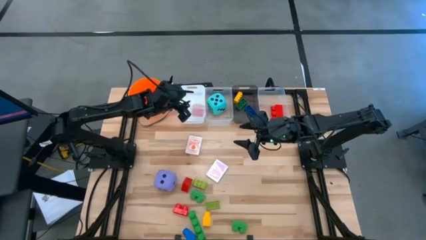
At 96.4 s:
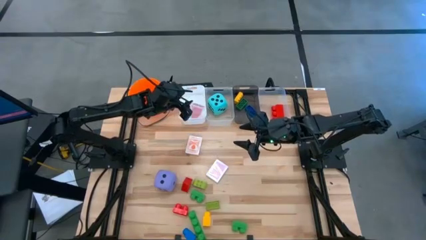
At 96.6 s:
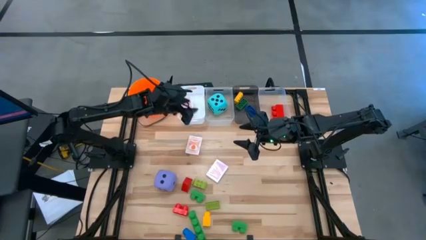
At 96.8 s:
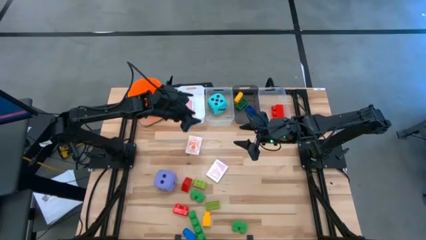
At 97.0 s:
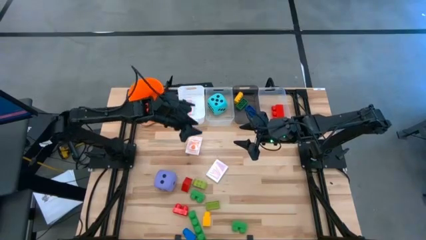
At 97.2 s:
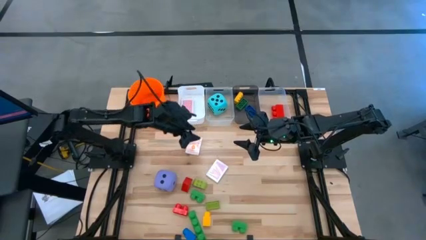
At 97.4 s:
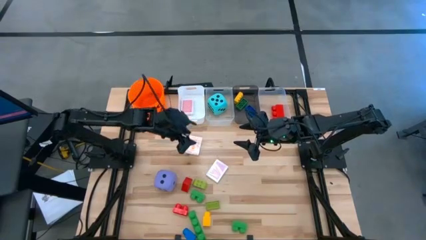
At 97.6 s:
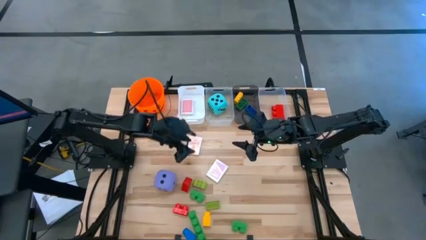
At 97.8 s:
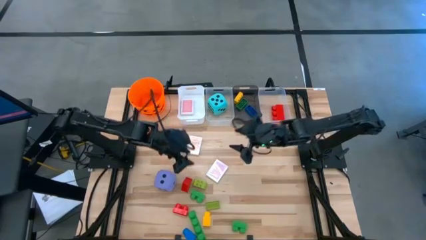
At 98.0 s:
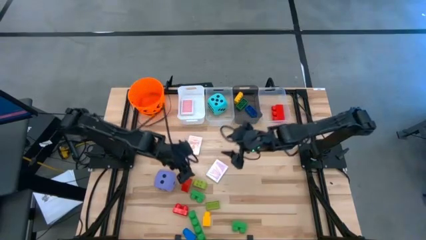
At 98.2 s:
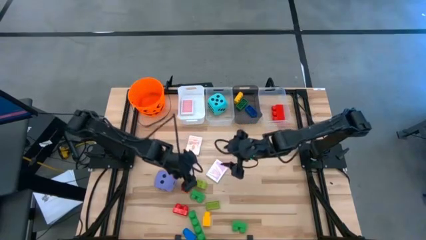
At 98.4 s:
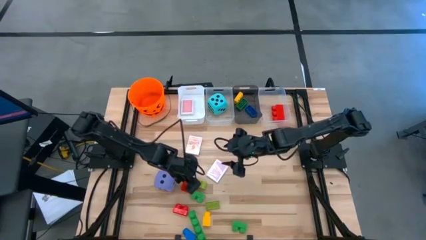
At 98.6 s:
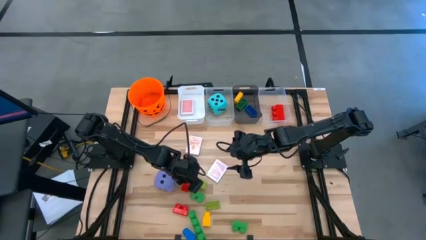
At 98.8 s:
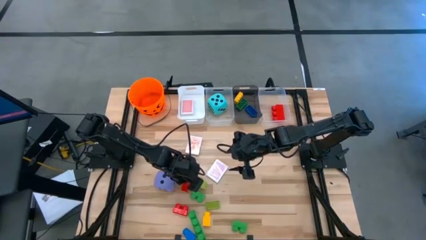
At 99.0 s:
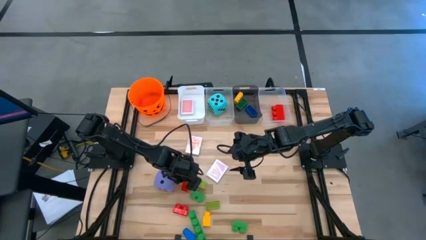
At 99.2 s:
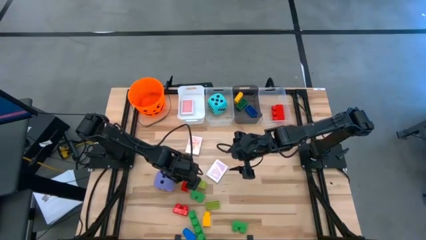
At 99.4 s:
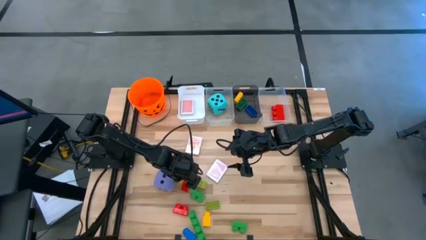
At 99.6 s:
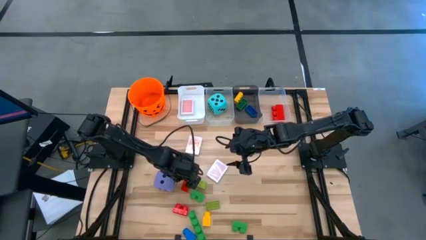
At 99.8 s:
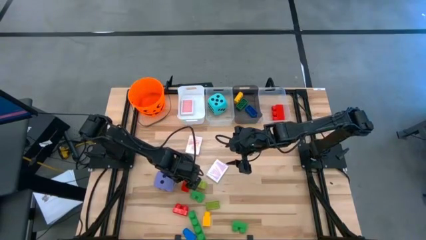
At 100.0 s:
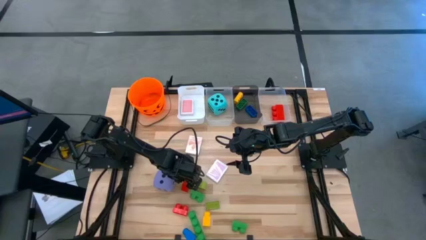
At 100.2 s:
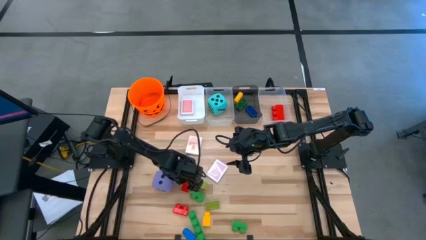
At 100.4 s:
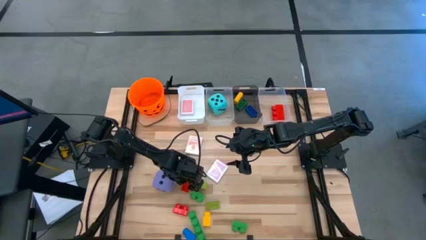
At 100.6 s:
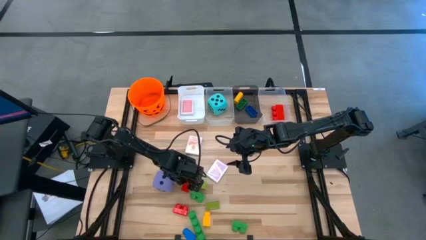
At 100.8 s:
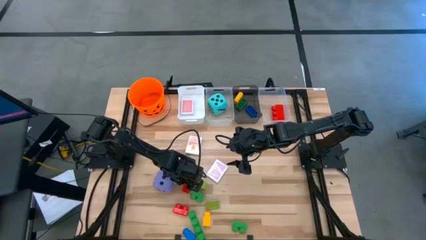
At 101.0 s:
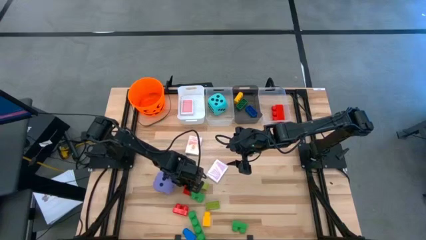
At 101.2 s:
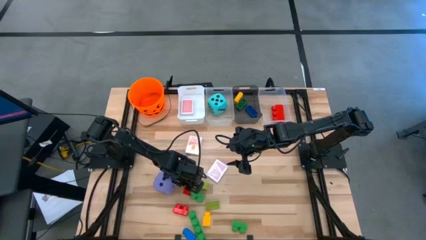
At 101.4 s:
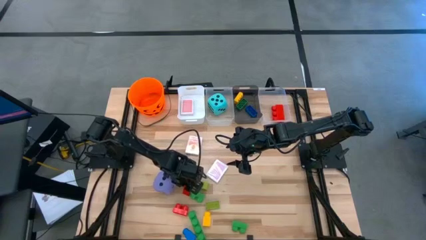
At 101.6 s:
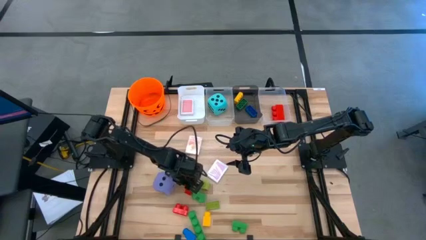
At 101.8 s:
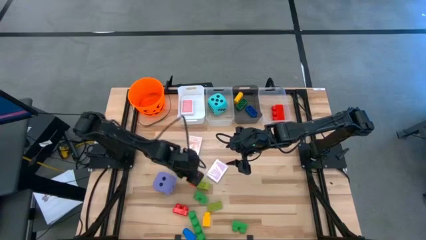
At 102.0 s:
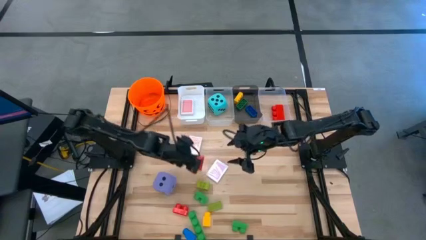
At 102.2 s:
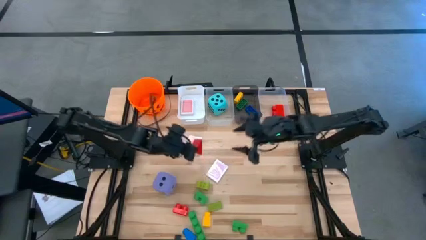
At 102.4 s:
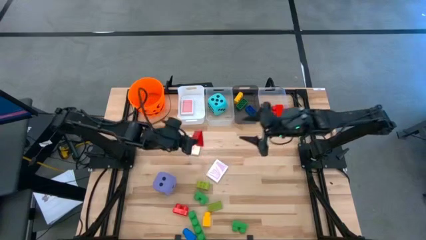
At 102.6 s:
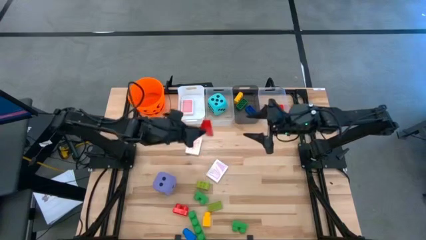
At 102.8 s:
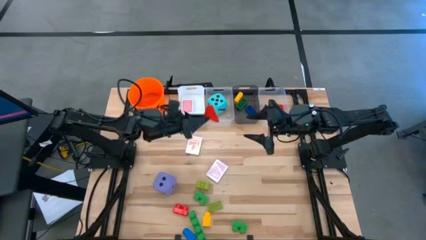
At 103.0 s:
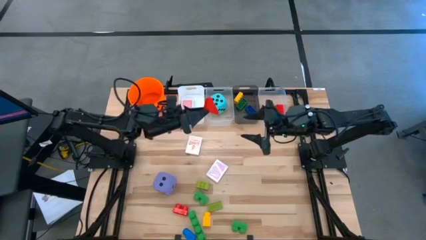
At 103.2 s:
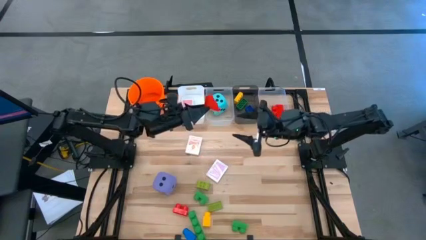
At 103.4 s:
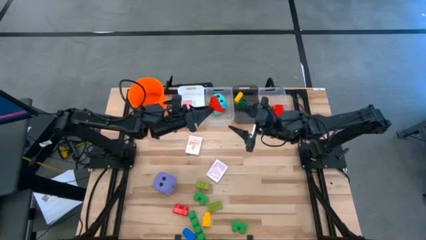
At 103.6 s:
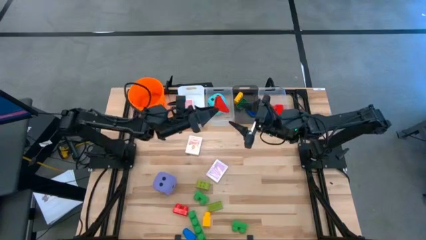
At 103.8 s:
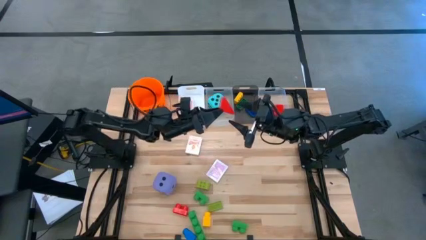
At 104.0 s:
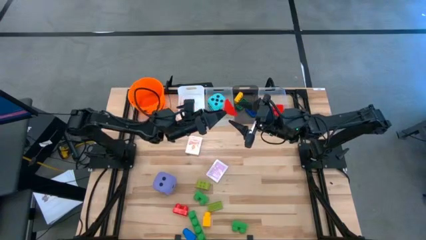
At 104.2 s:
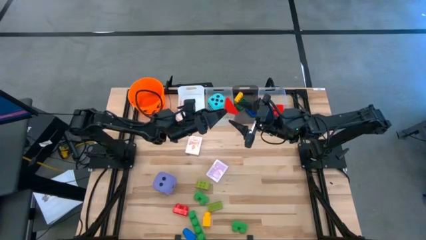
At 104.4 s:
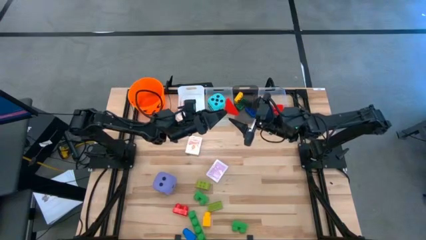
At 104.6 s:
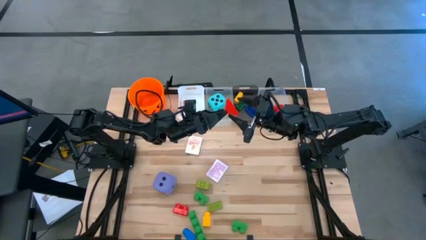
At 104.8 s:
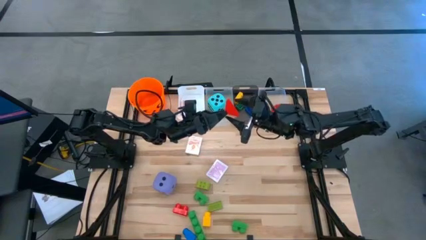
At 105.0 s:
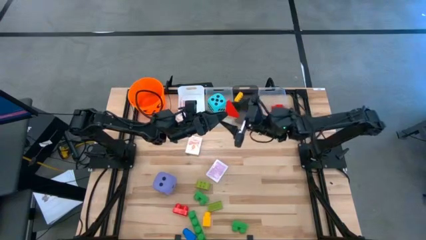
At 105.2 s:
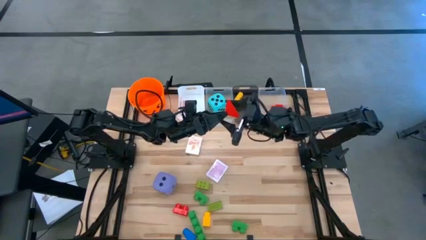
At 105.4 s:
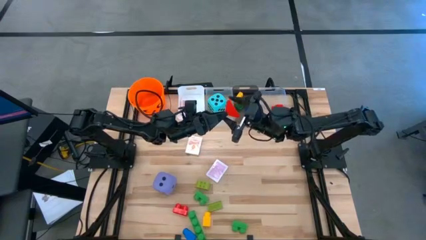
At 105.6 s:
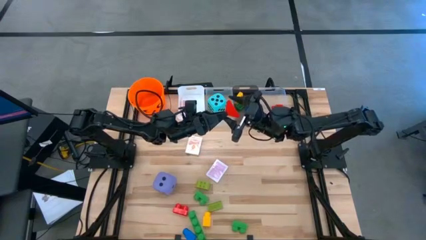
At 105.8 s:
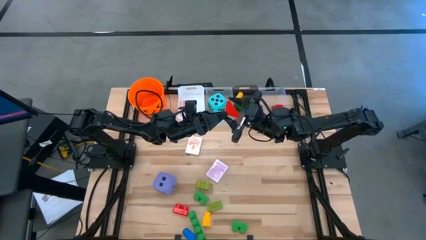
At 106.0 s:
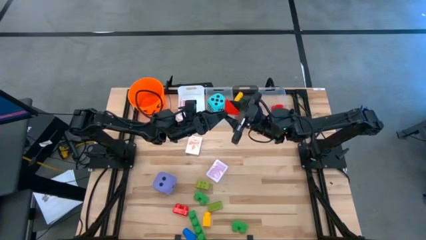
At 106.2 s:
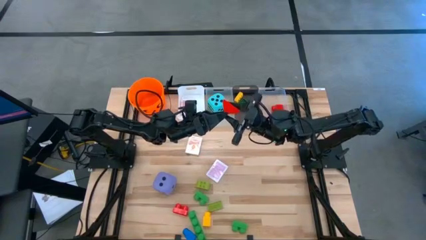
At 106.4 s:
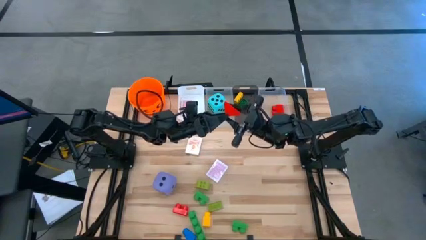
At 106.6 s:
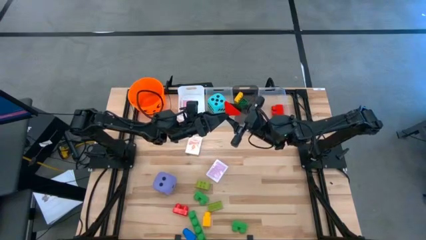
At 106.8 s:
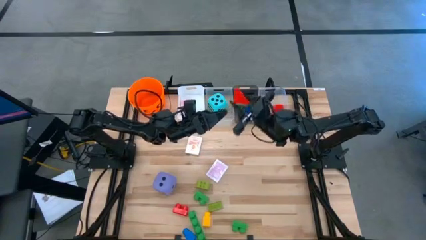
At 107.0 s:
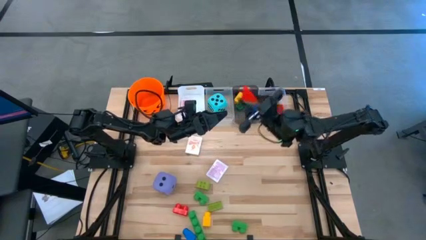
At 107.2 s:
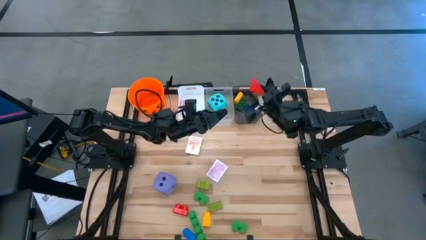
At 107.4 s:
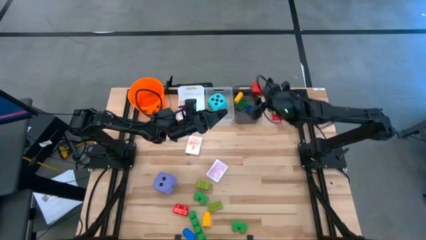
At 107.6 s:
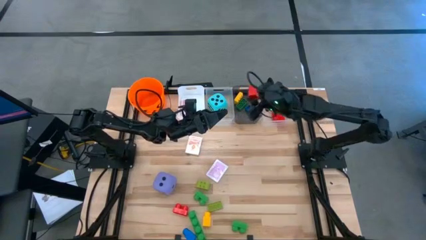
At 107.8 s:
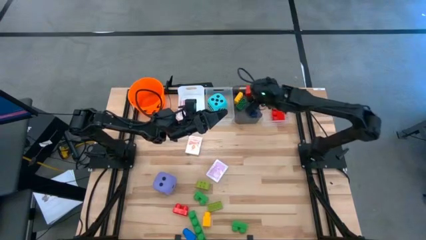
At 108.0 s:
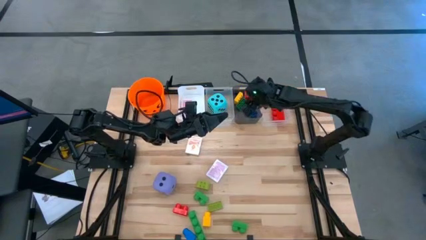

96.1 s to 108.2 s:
Task: Pick & Place Toys
Put the small red game piece into the black bin
